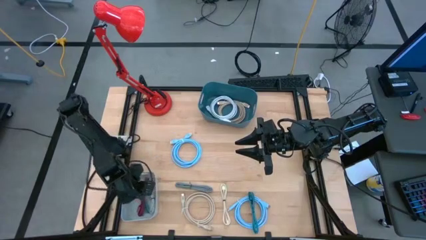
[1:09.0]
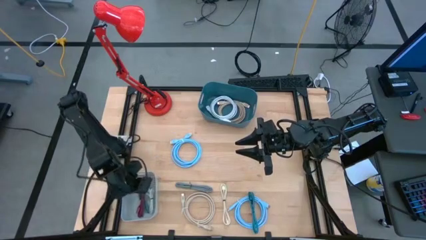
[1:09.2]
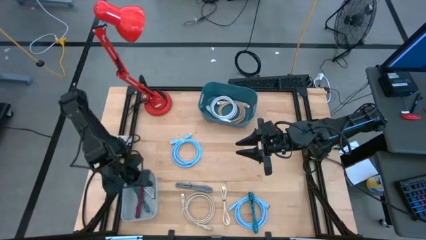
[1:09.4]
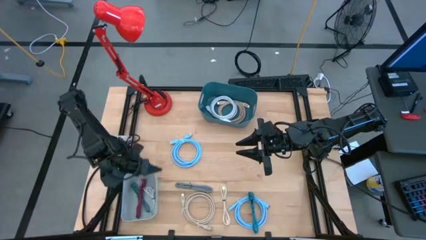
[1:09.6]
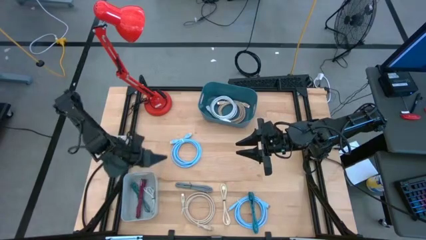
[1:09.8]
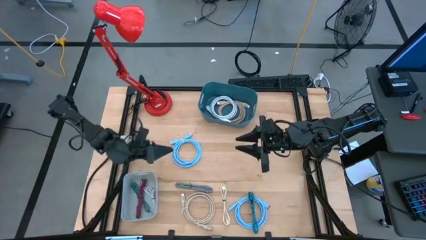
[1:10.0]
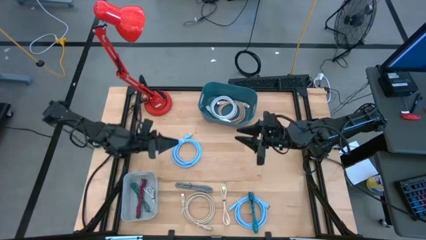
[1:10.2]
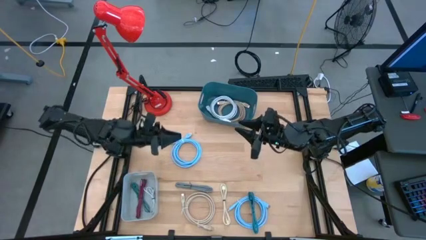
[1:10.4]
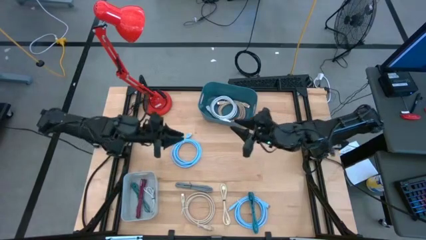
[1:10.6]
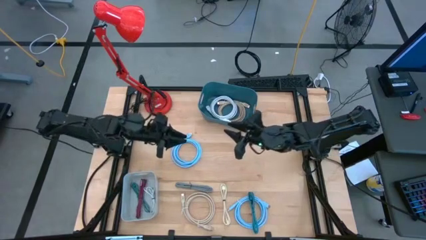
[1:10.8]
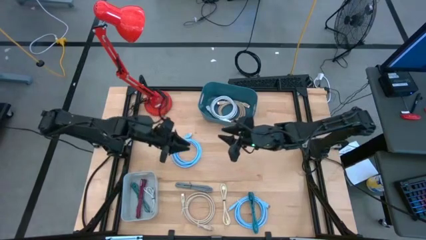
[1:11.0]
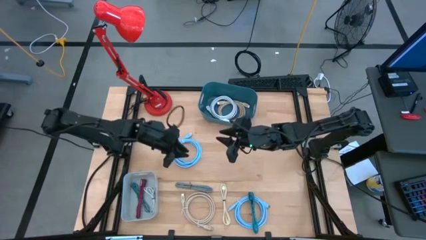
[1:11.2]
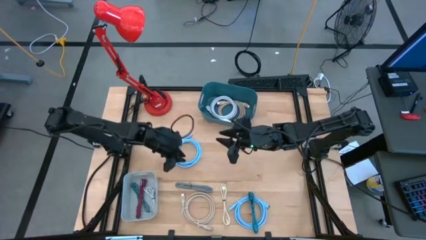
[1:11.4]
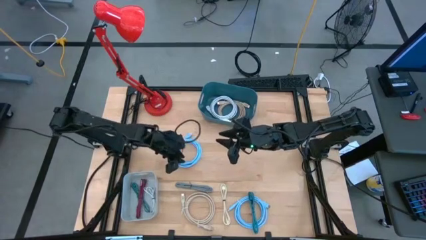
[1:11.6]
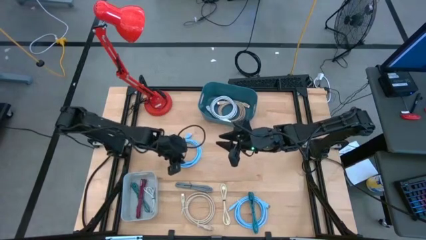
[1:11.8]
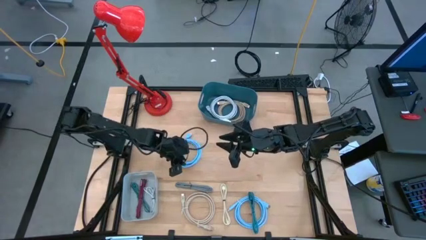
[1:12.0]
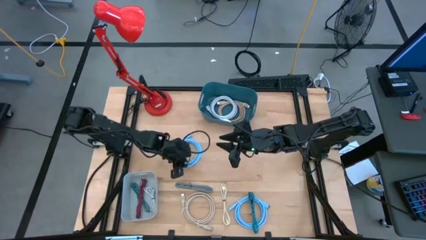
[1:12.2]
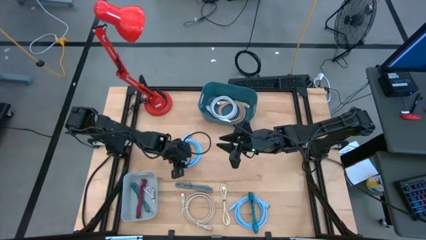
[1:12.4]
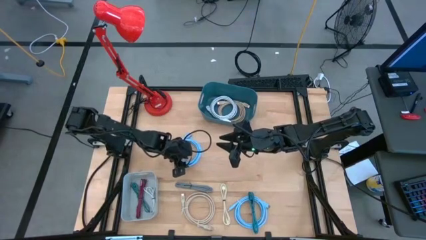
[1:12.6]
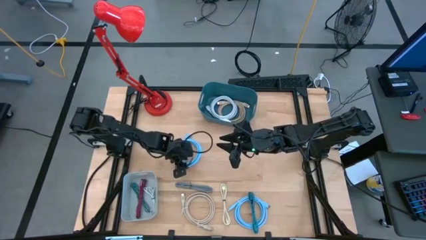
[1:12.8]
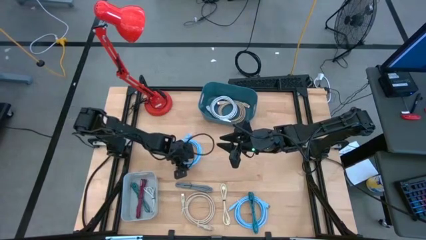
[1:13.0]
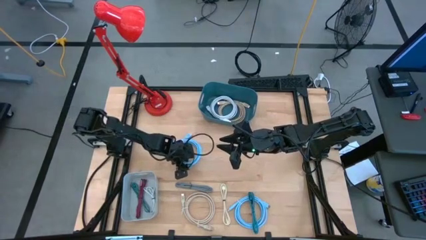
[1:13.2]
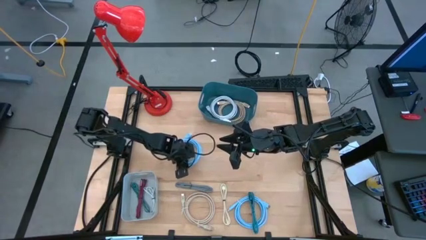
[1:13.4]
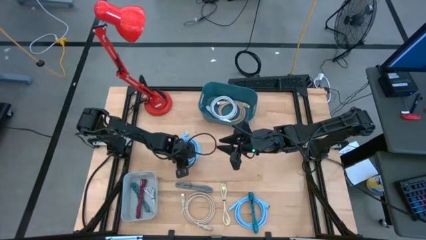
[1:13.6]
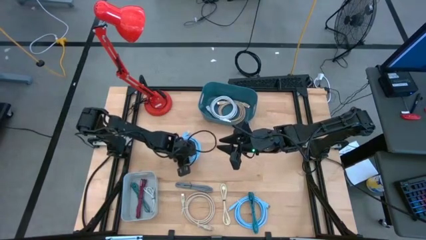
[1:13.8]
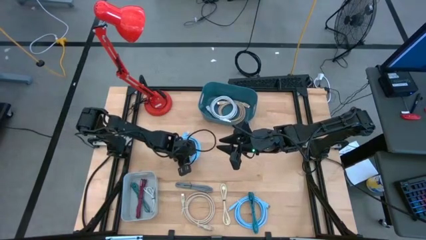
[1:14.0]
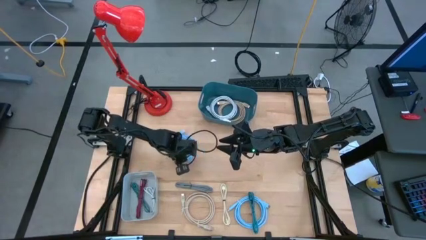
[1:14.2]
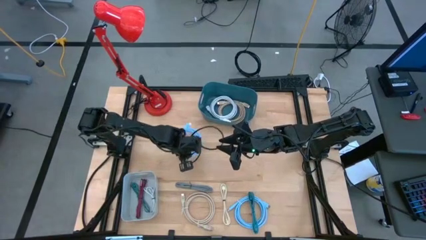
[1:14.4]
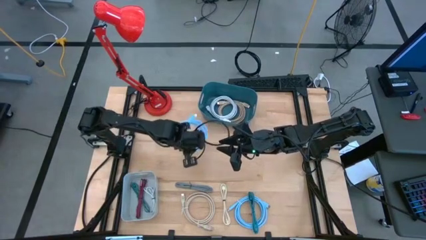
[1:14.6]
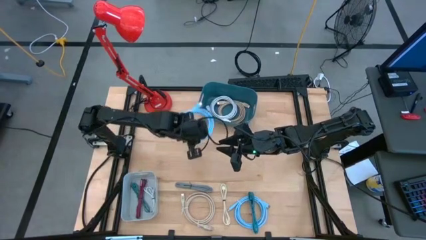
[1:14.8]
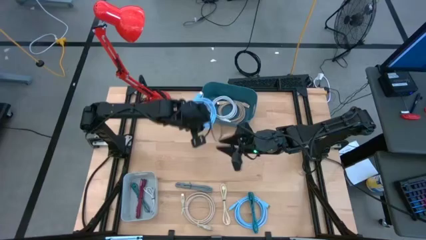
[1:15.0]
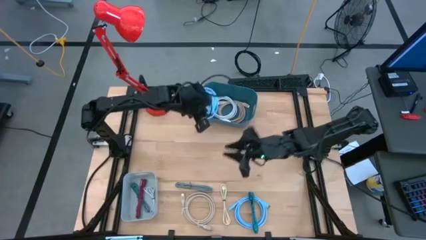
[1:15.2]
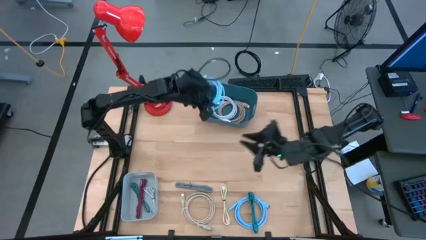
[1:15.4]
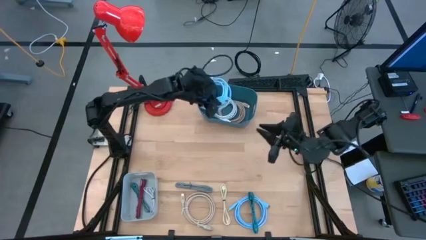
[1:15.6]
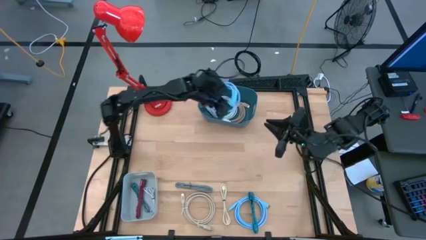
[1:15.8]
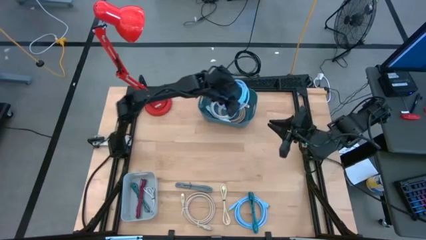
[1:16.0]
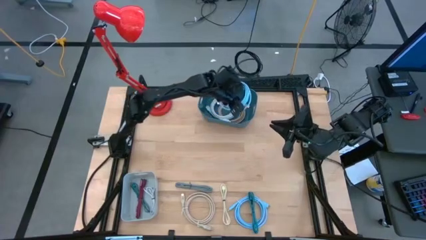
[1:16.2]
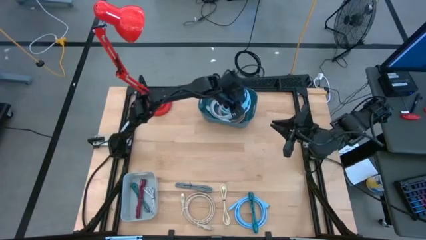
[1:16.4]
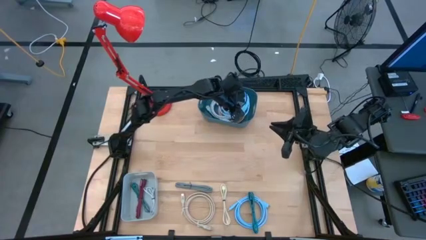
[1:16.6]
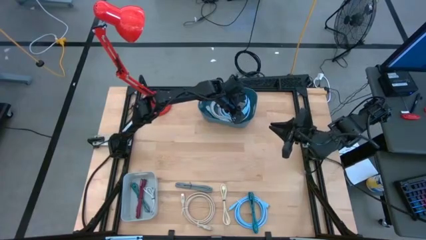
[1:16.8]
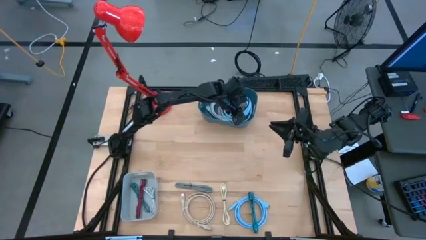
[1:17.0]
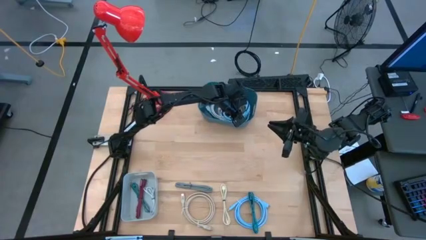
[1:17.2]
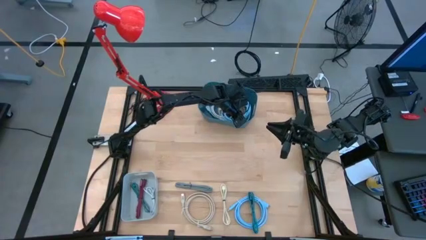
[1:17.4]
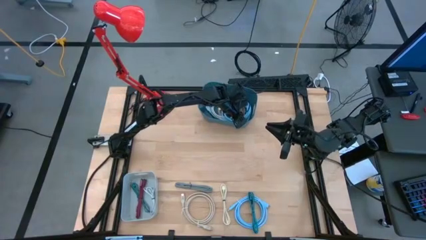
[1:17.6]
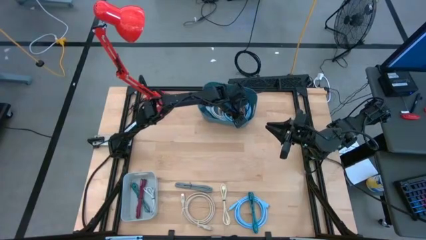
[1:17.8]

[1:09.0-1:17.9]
Task: Pick & Place USB Port
Put the top light blue wire cable into the blue bin

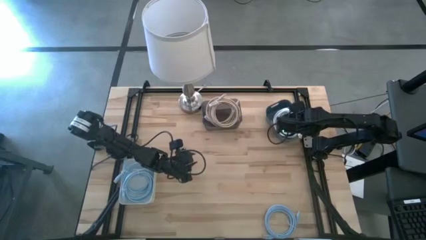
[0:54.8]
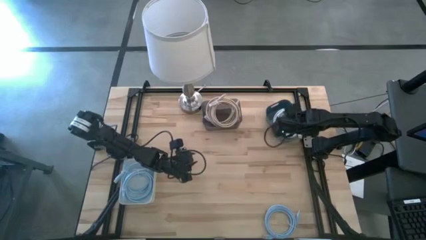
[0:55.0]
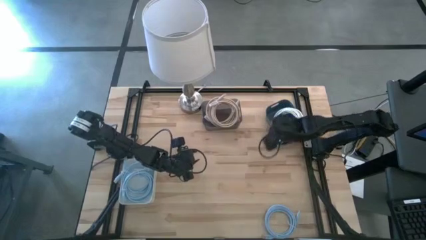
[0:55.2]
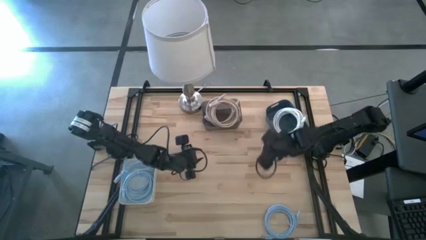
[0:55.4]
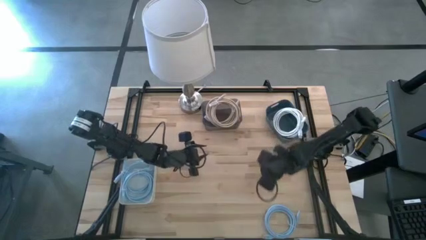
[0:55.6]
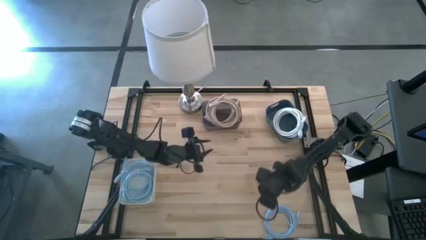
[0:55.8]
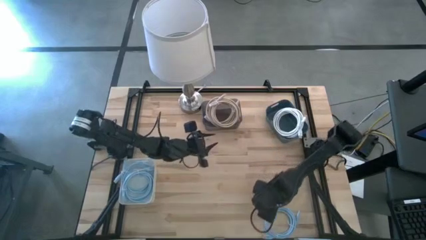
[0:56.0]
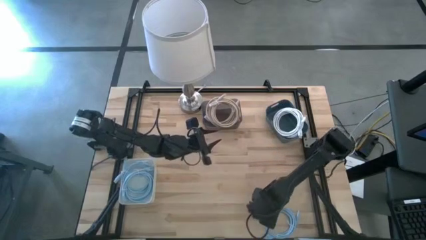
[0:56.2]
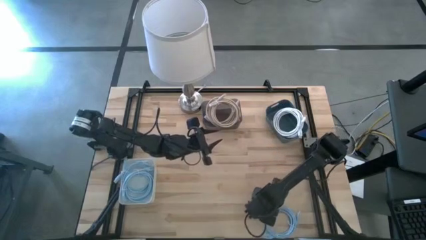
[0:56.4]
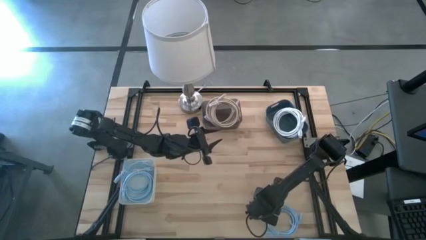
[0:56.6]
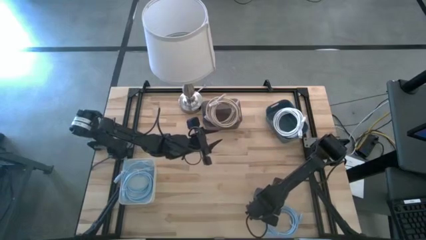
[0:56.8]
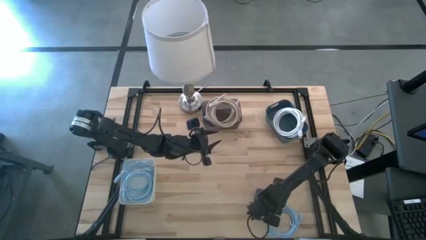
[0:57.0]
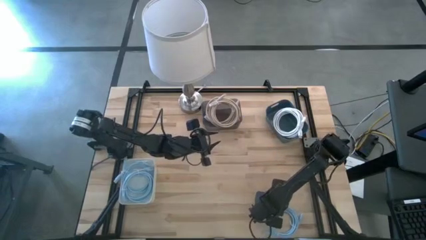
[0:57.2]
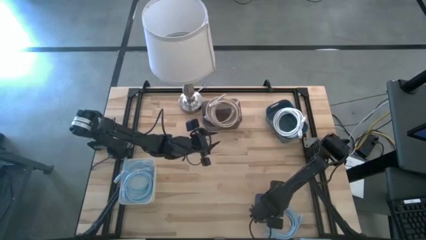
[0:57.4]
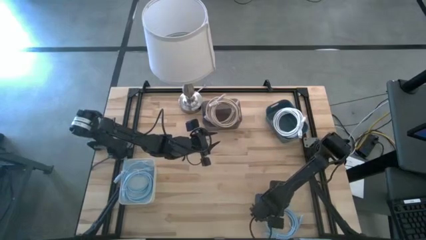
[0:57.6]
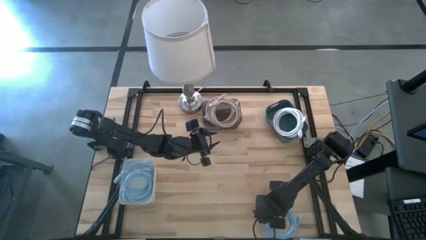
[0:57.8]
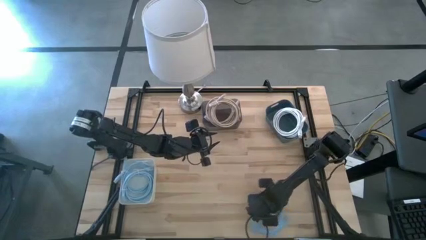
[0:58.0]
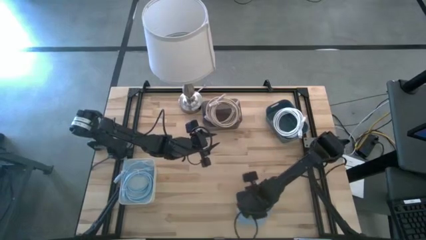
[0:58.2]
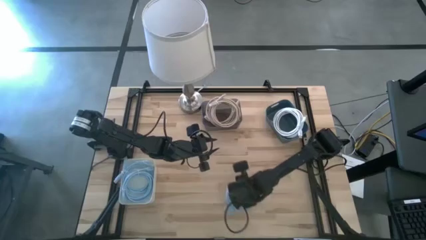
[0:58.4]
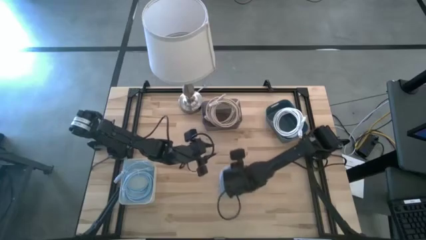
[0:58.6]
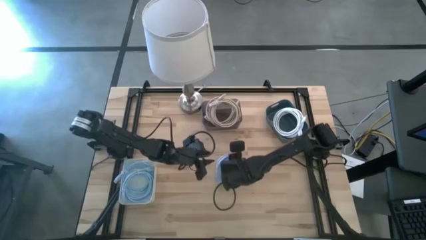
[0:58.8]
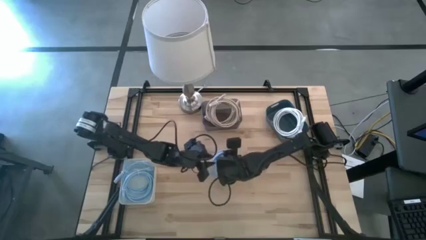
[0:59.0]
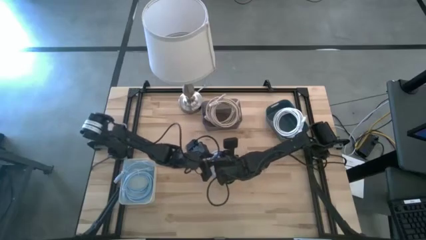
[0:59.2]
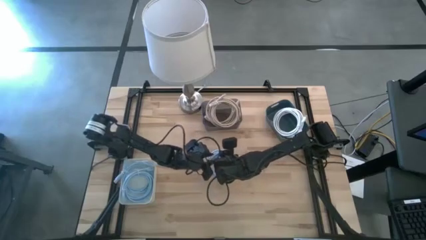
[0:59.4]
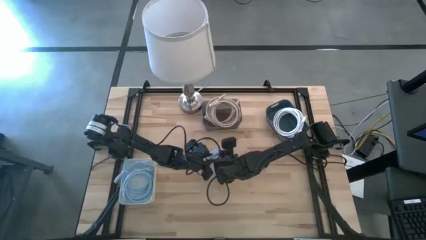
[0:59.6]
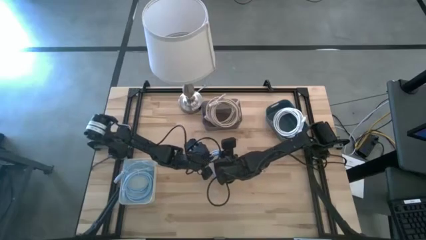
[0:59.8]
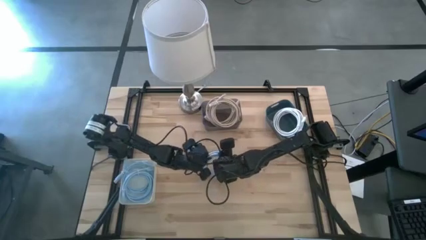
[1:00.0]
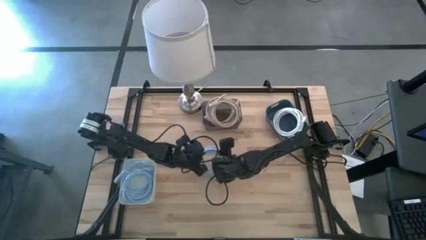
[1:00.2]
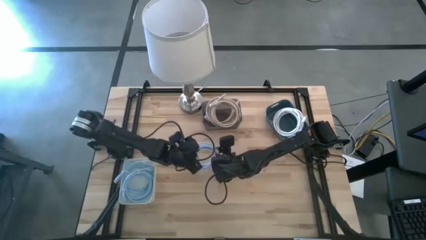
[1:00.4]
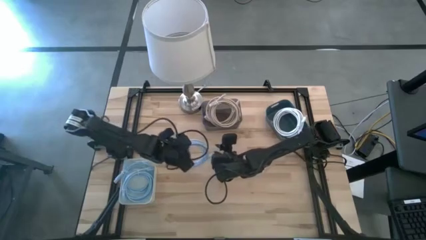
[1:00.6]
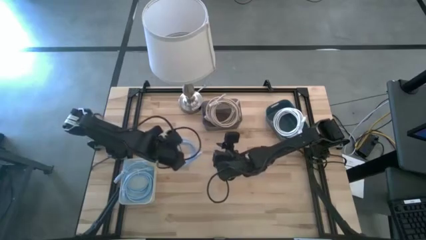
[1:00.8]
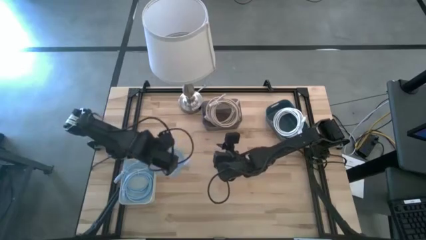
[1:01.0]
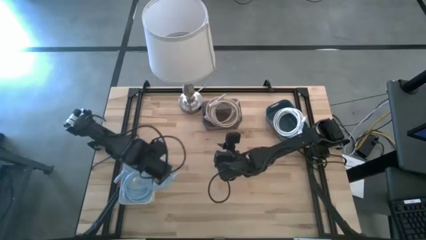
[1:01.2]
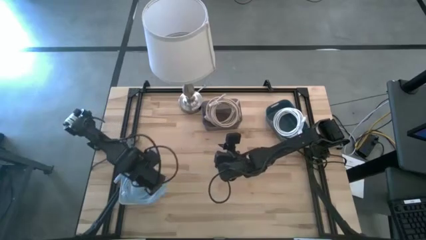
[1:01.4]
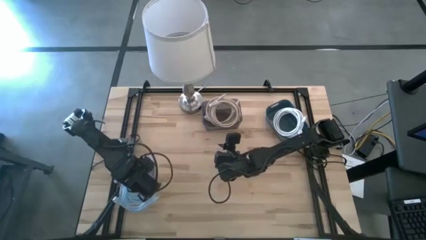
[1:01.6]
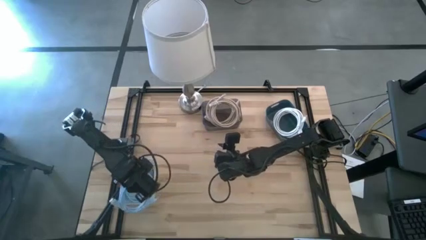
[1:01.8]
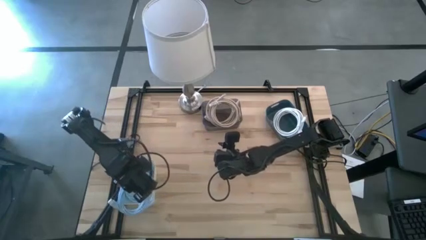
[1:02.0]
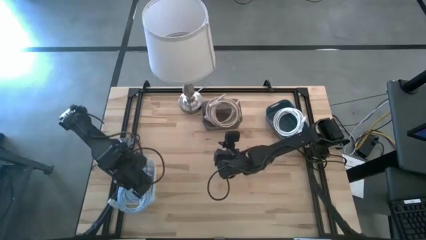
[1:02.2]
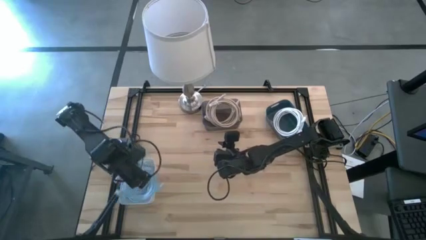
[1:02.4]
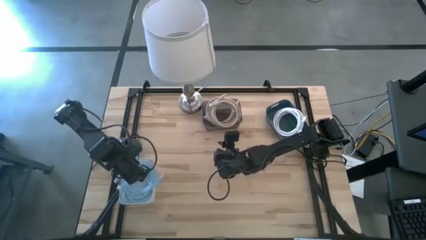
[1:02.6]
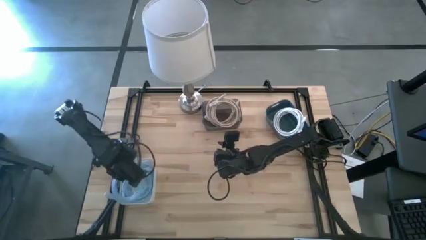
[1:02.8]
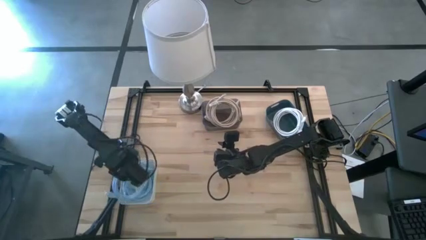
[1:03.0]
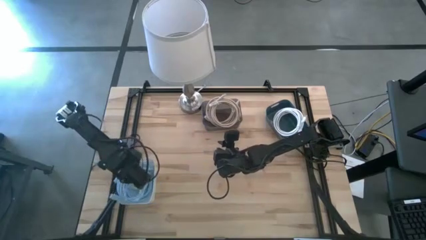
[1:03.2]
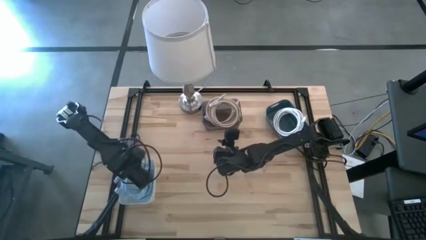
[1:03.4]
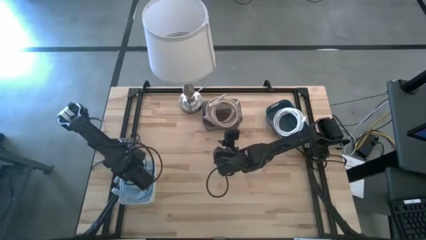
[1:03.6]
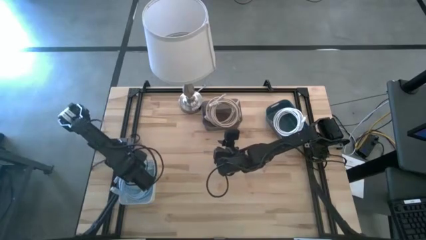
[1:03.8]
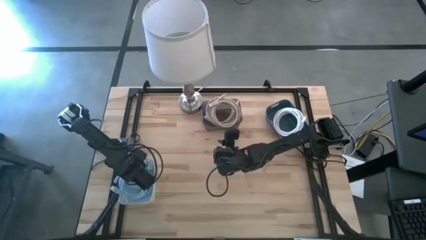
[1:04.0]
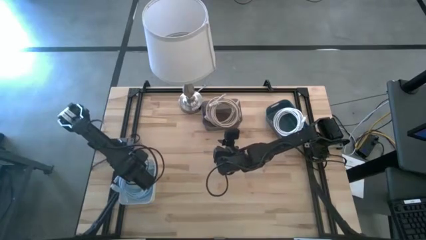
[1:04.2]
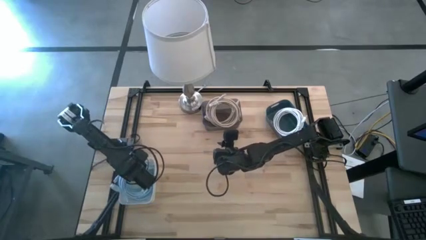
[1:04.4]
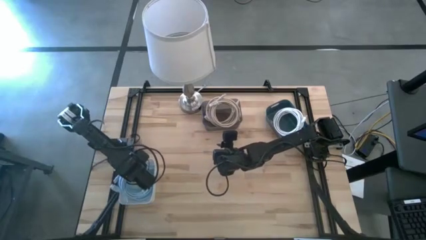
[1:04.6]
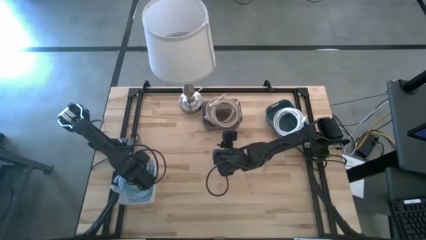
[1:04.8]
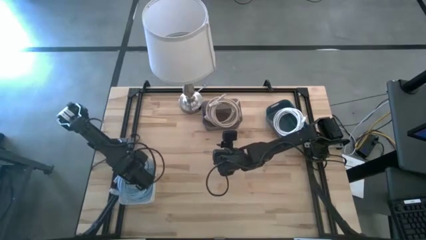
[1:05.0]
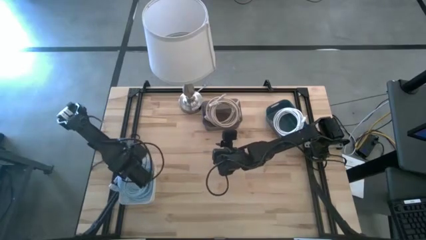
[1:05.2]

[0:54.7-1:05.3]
Task: Sort HDMI cables
Put the light blue HDMI cable into the white bin
